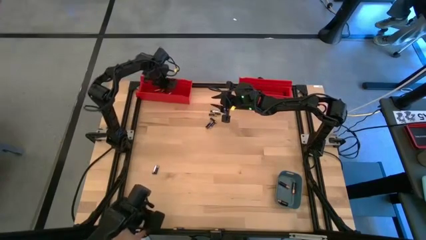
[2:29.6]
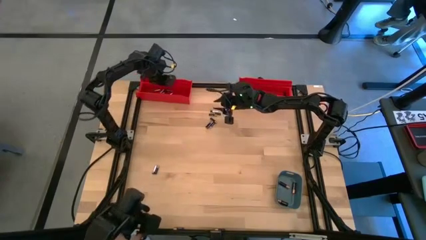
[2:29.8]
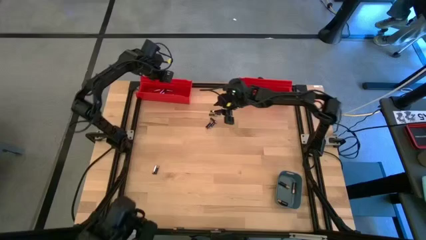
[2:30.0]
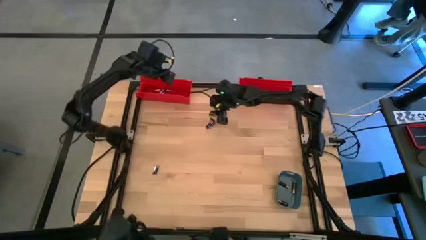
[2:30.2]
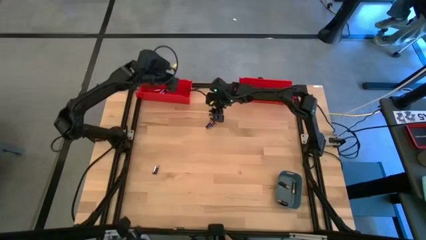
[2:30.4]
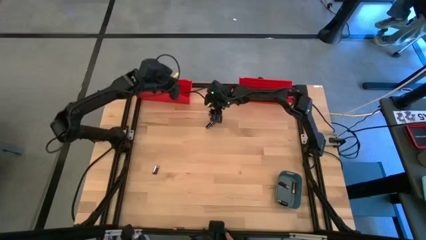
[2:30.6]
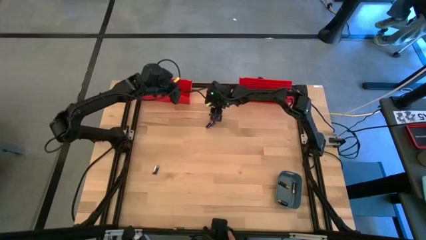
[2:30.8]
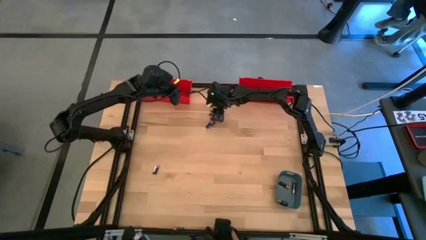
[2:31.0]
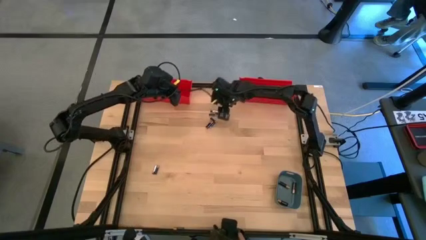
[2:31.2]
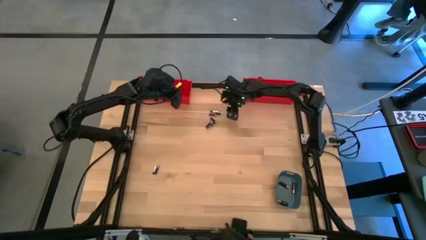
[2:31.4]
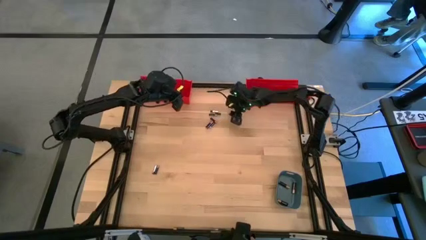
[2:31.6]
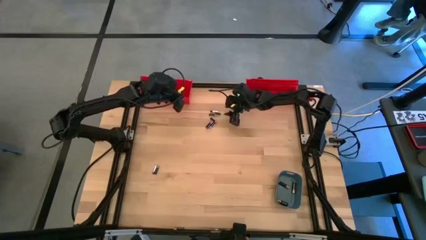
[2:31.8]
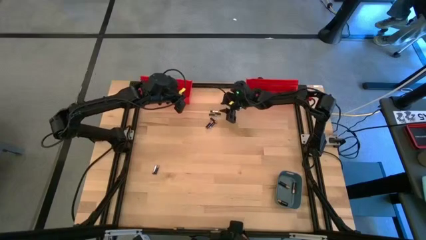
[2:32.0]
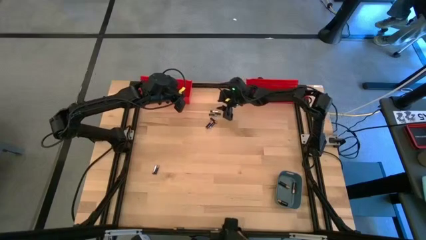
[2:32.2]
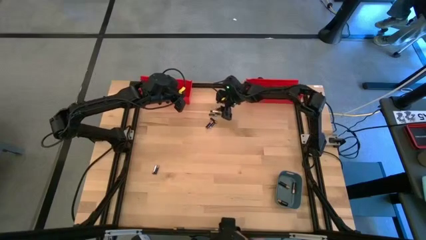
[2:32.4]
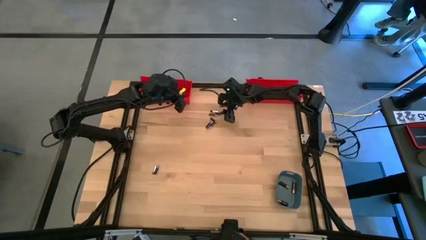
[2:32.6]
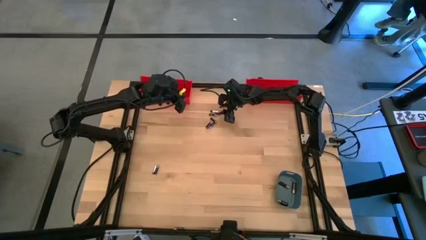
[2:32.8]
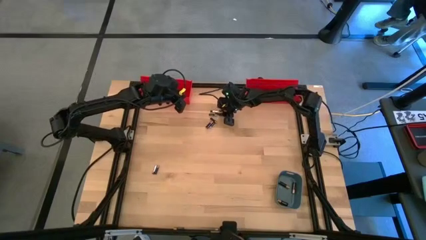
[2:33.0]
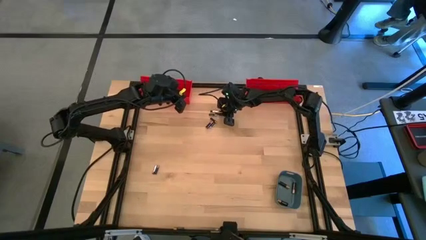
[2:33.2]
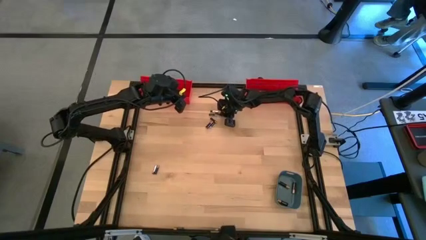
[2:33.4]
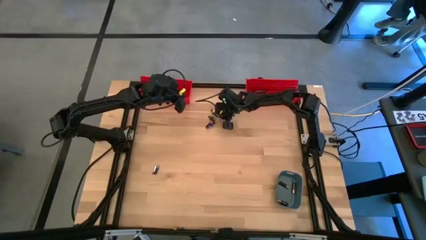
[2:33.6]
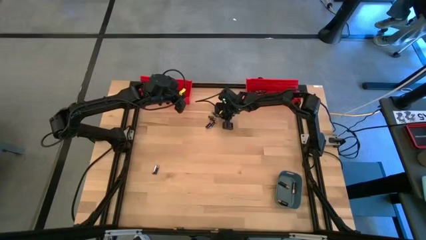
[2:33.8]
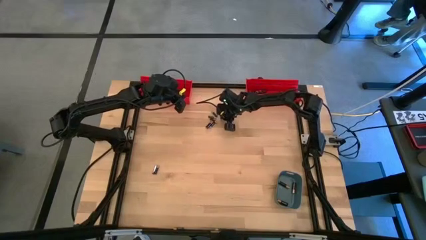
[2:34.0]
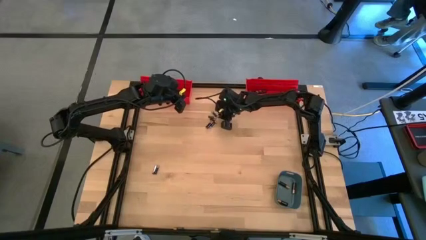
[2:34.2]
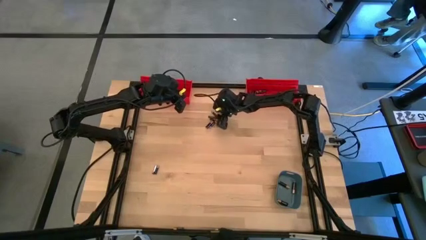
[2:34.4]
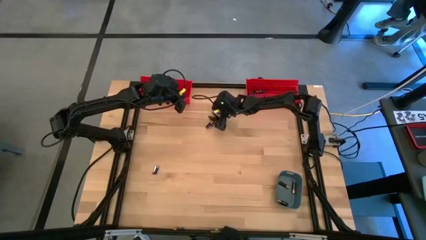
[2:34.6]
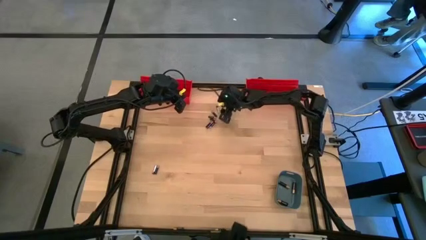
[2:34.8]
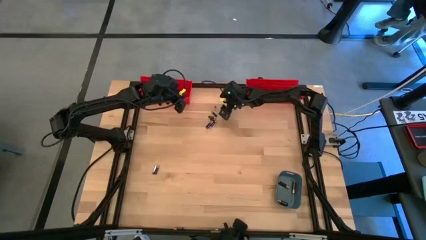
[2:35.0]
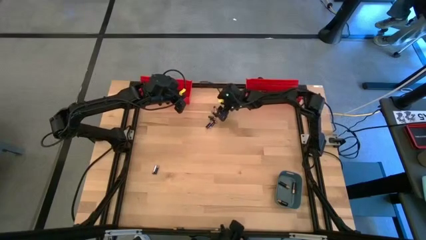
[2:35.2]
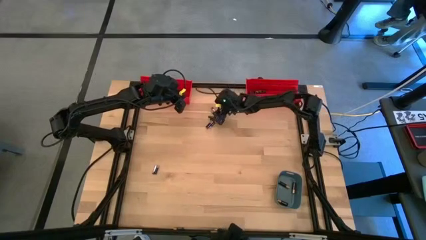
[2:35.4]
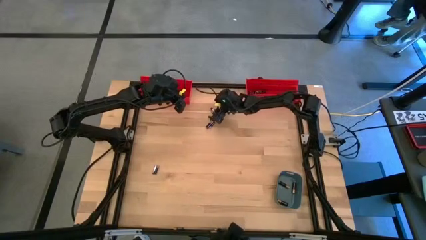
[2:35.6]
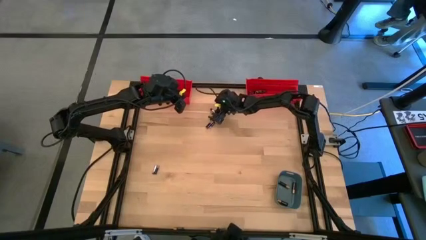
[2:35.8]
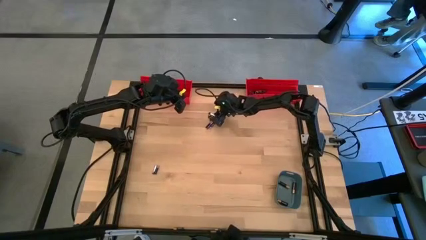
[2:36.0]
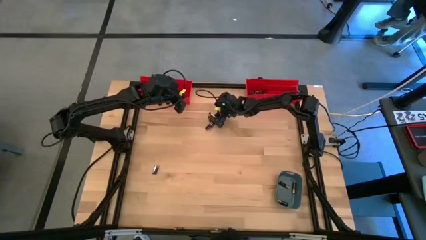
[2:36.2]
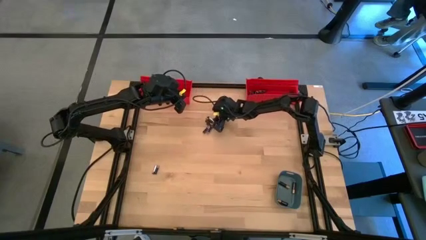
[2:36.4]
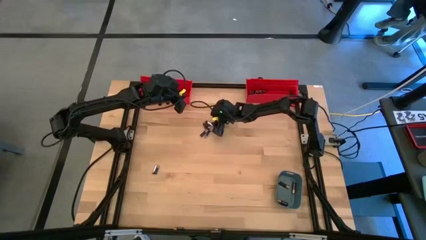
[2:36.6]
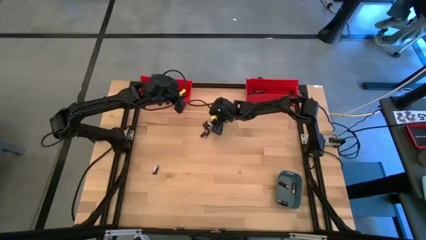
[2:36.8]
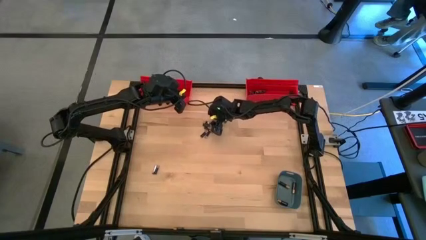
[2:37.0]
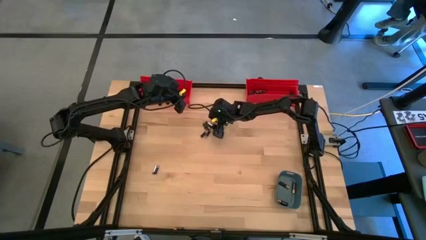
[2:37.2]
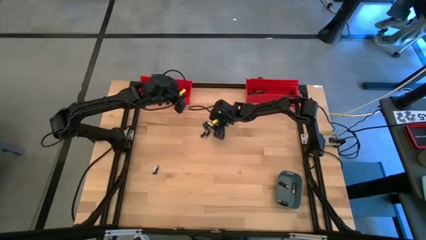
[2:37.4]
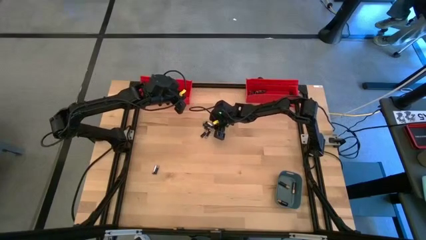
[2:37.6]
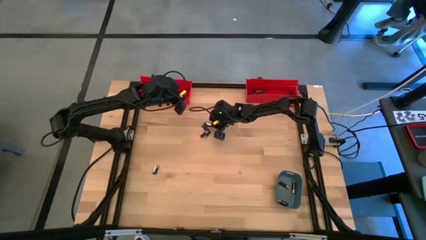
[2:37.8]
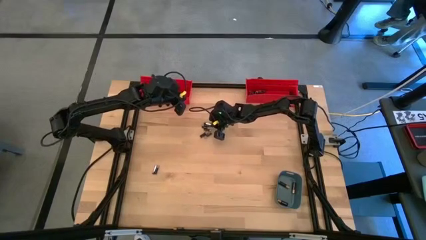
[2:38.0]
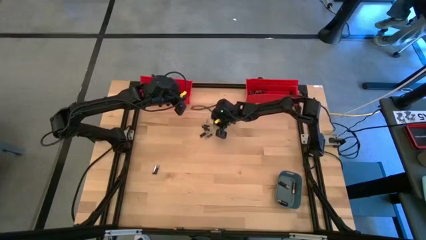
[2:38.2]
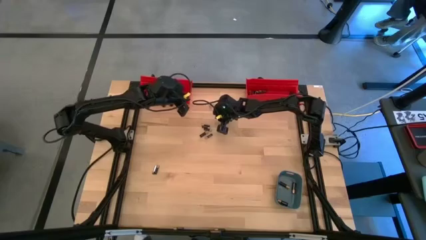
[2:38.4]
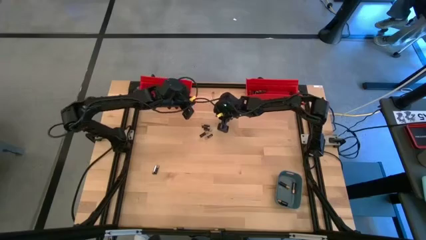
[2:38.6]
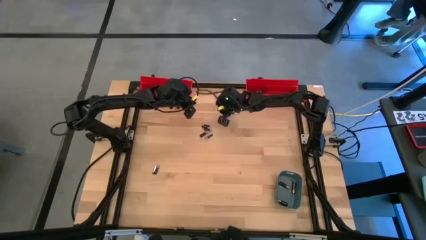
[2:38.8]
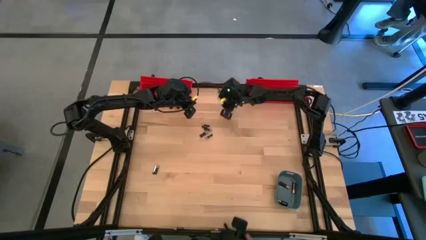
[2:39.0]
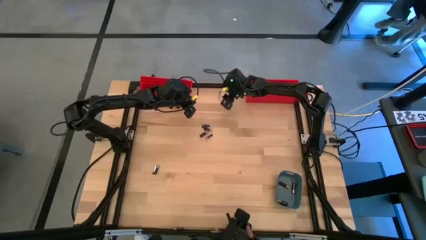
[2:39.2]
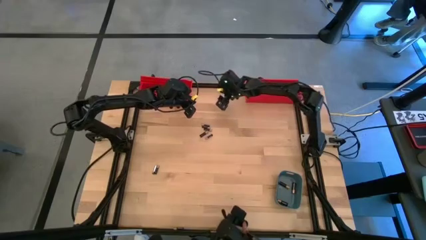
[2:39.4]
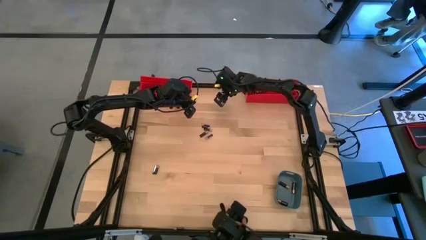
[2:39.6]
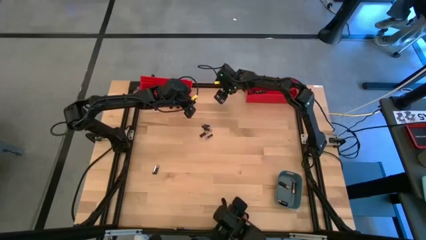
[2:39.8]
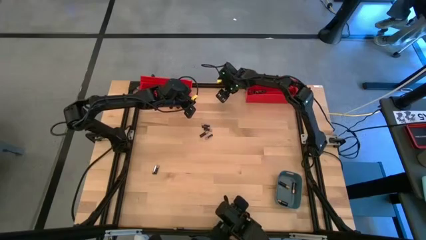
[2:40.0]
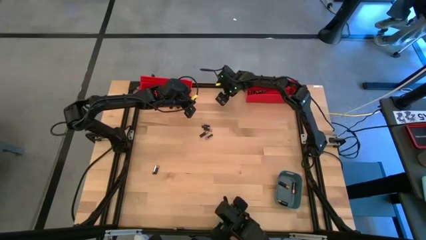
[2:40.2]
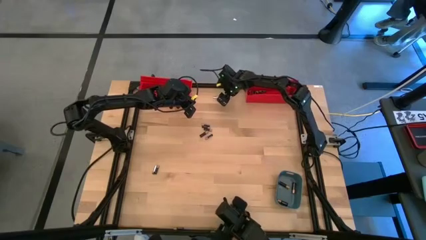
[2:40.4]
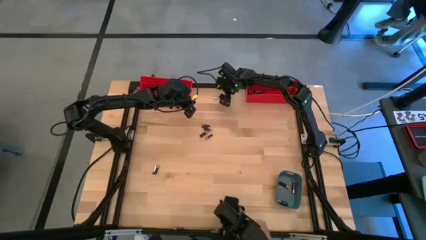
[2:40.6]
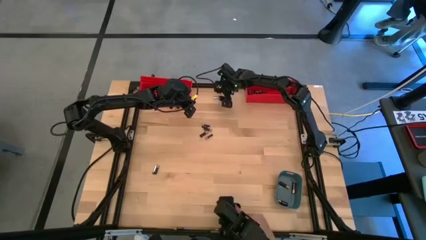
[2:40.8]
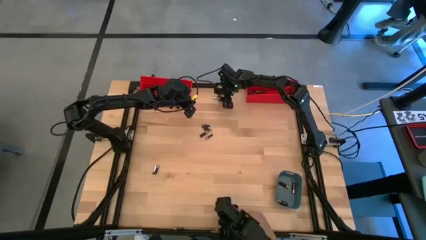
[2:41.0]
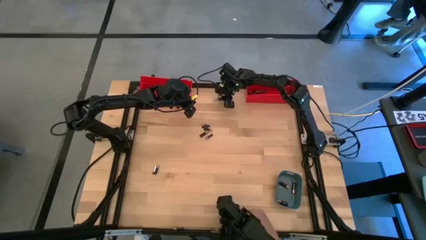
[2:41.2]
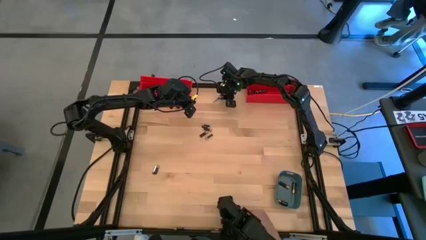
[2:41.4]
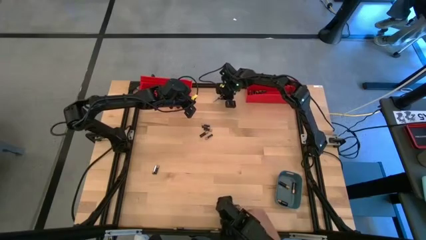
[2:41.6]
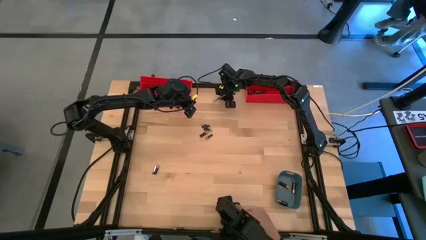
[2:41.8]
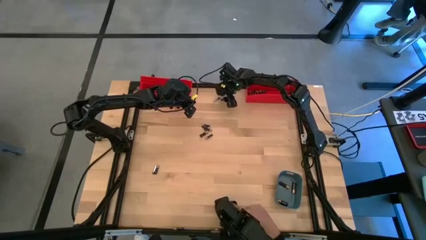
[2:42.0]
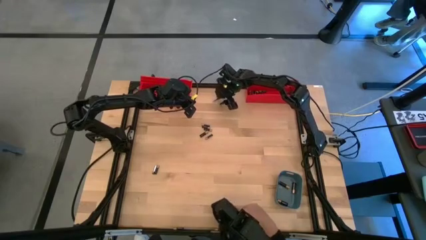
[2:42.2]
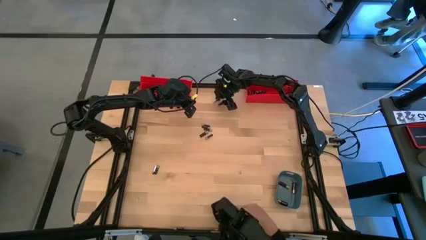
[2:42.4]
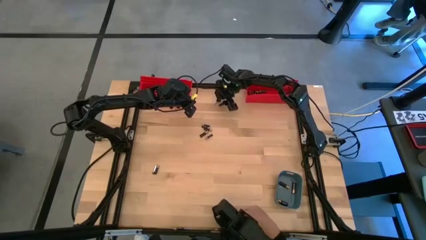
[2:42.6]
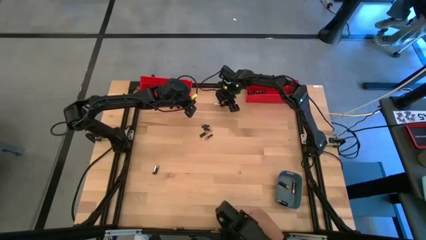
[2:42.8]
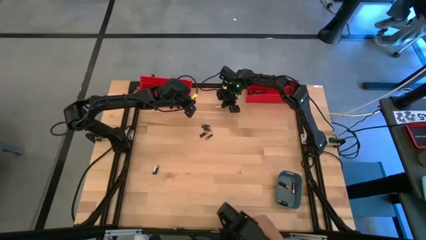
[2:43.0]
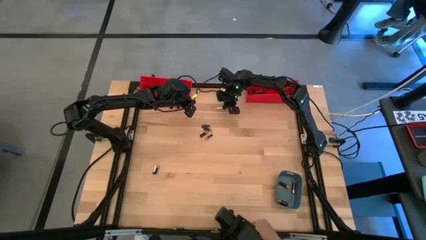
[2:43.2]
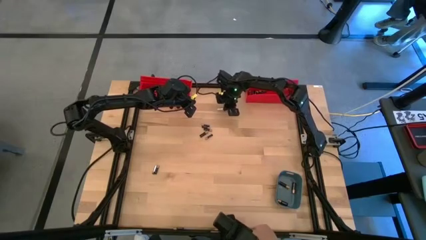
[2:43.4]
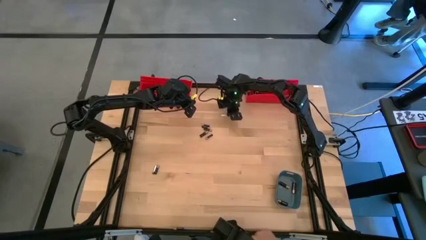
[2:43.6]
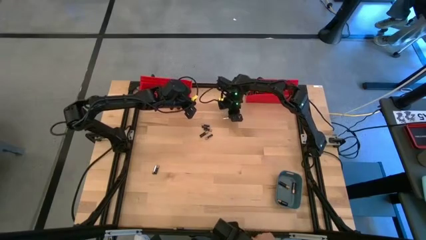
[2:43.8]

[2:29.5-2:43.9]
Task: Sort batteries
Put the small silver battery into the left red bin

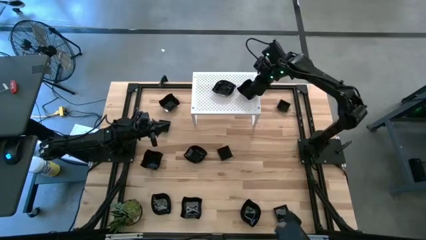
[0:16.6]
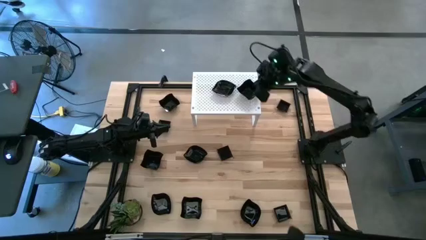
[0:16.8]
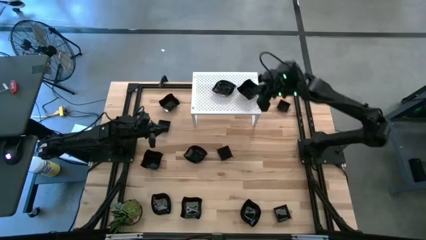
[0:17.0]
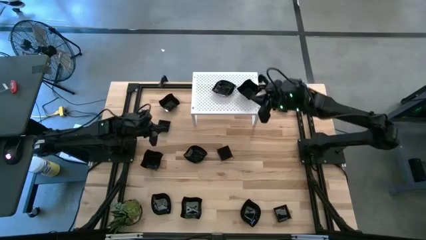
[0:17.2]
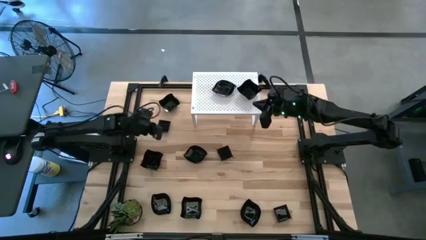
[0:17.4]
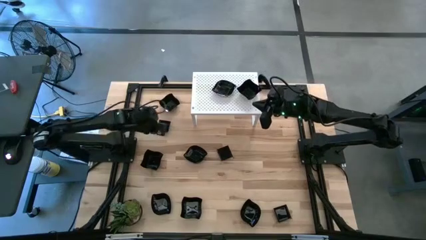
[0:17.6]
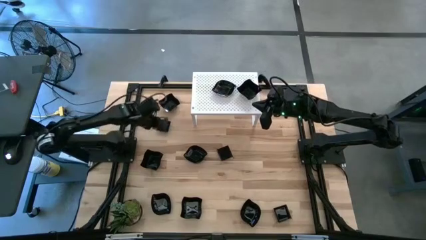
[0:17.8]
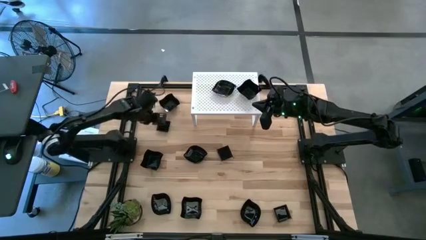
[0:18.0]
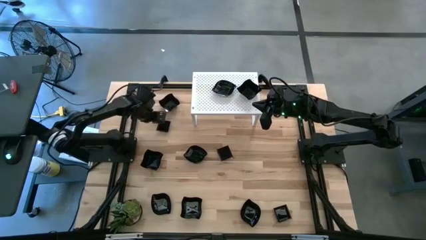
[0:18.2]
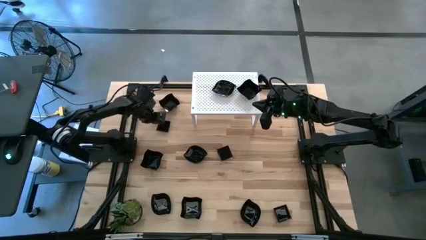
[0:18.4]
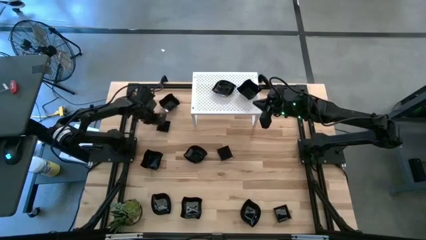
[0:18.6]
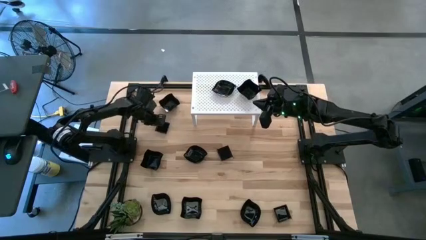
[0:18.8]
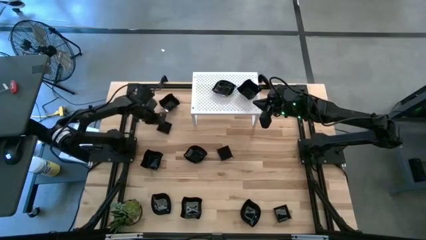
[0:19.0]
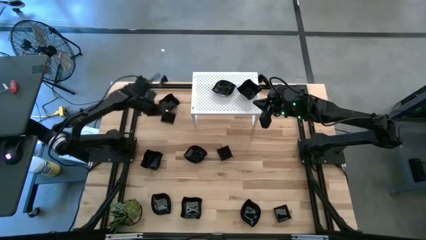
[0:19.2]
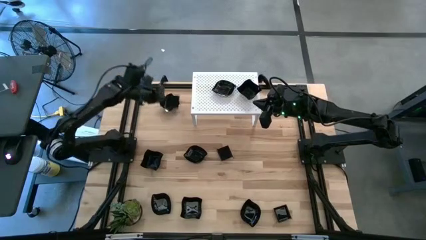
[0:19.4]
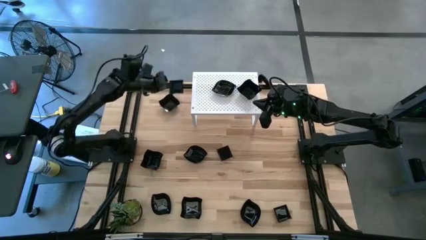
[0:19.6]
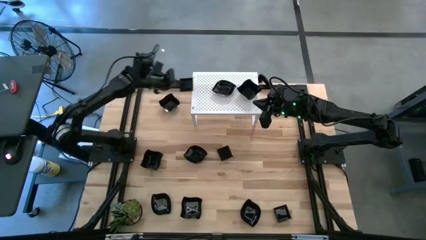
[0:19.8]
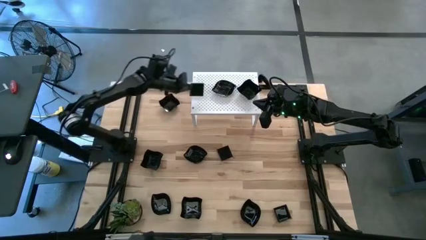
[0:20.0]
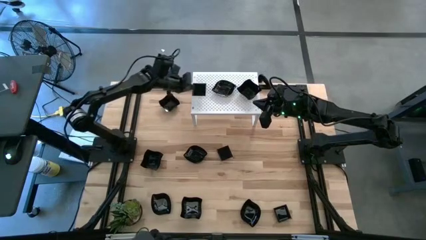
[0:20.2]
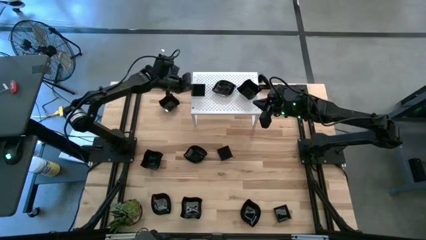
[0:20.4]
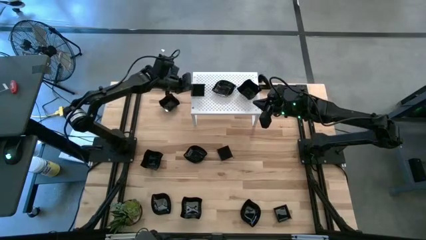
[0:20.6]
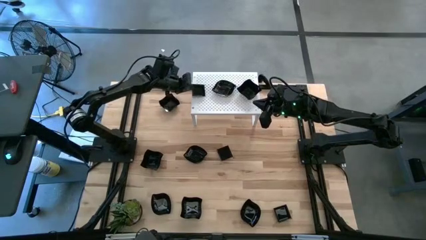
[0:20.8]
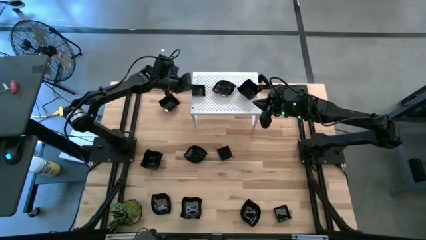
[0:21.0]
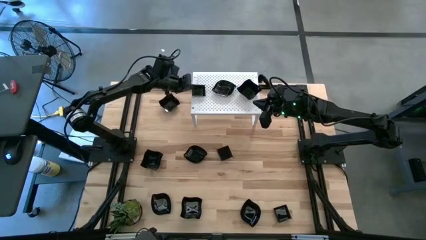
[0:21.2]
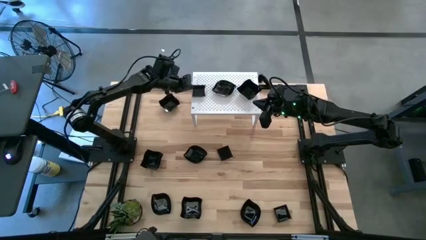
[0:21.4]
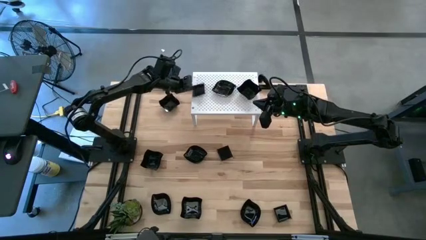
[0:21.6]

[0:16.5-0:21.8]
Task: Pick & Place Mini shaped plates
Put the black square plate on the shelf
